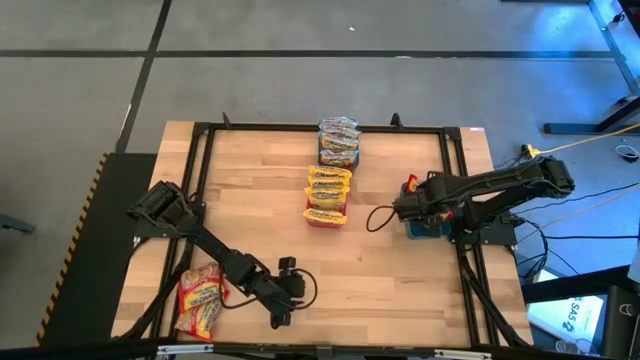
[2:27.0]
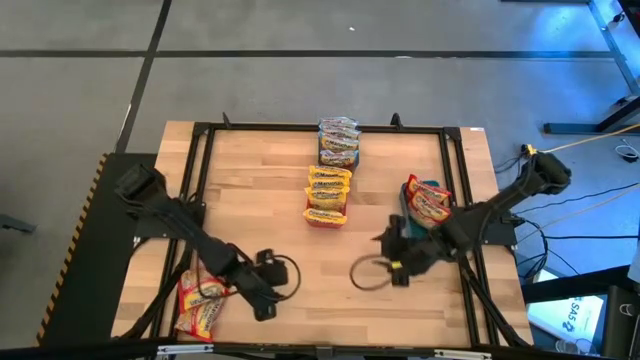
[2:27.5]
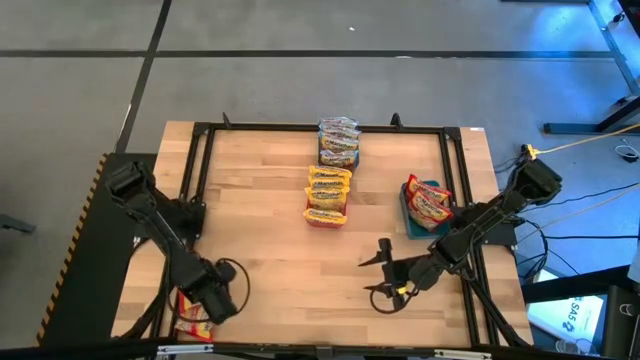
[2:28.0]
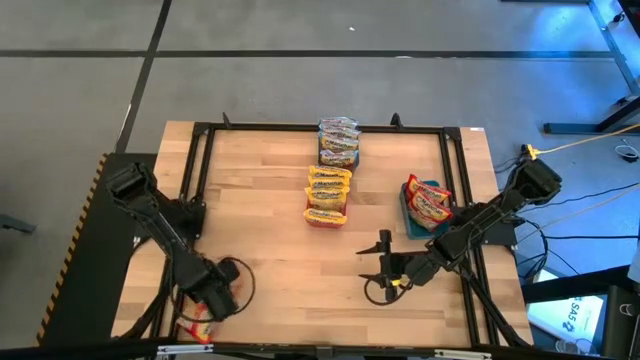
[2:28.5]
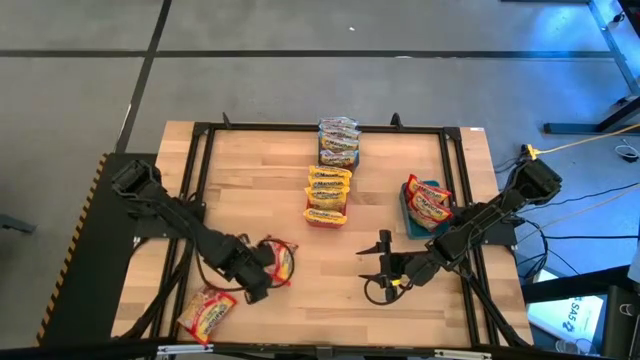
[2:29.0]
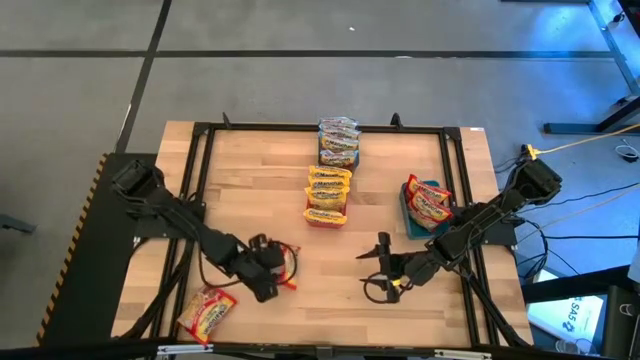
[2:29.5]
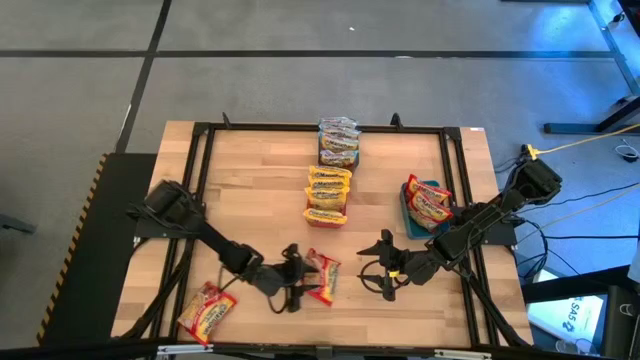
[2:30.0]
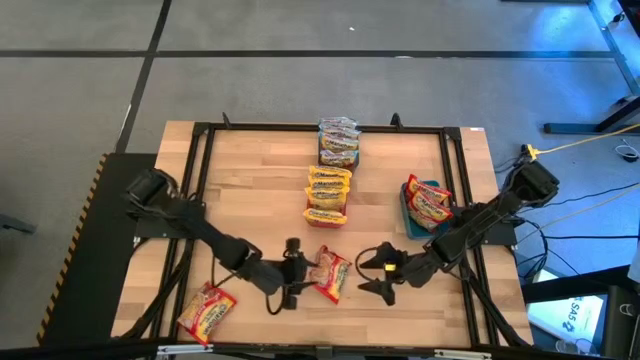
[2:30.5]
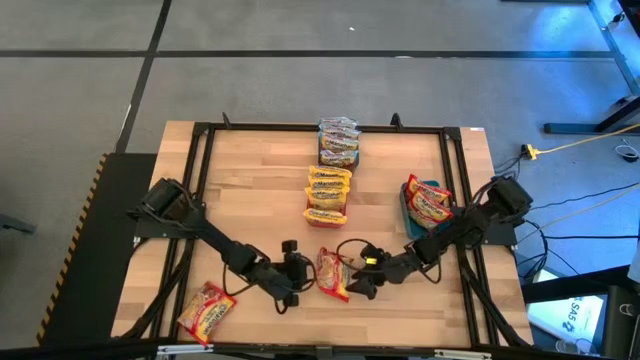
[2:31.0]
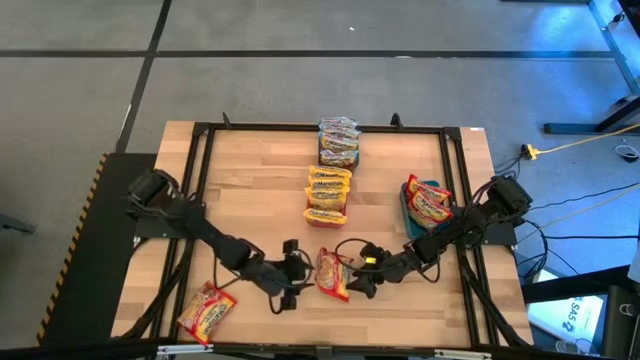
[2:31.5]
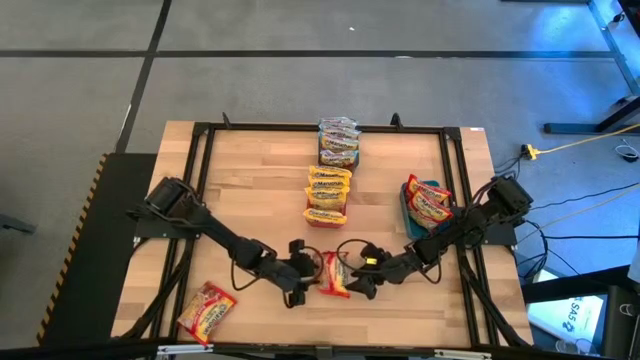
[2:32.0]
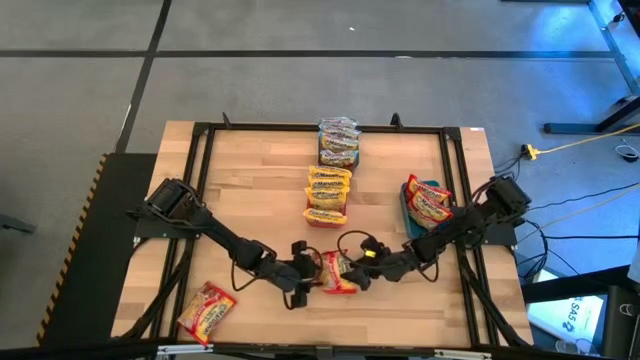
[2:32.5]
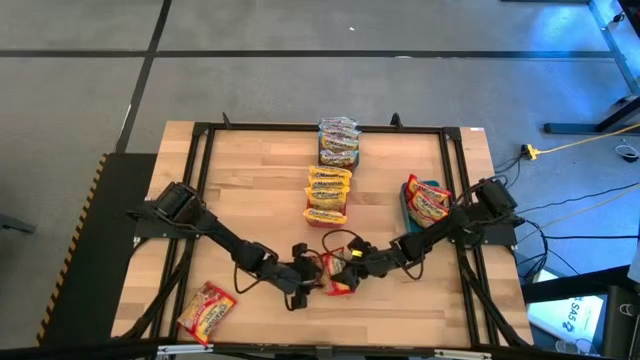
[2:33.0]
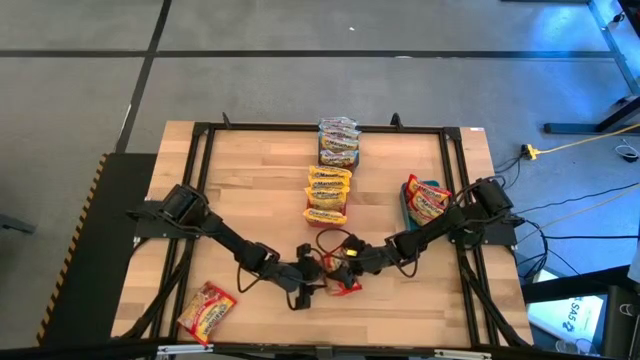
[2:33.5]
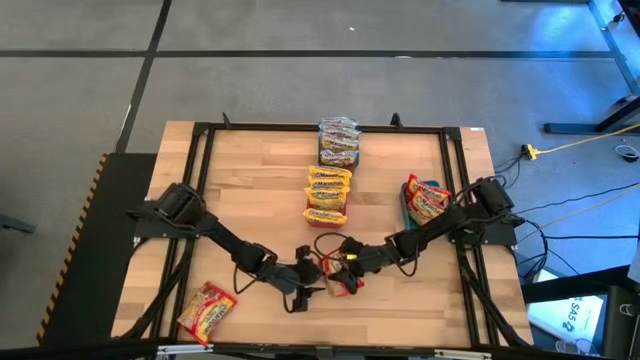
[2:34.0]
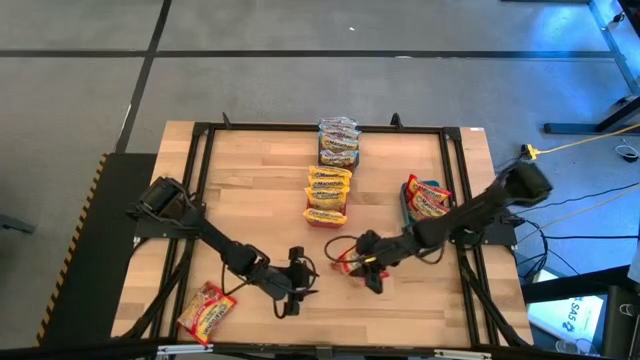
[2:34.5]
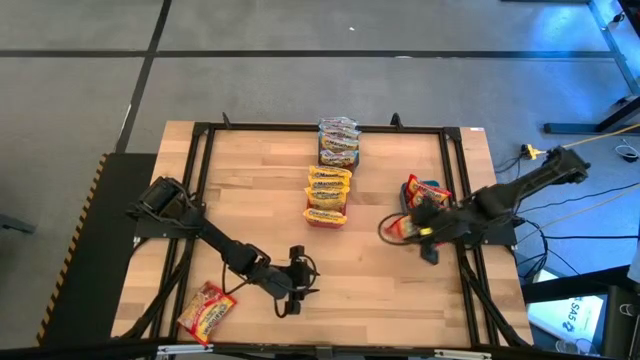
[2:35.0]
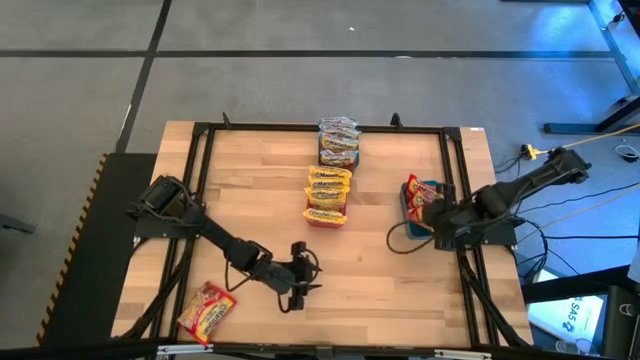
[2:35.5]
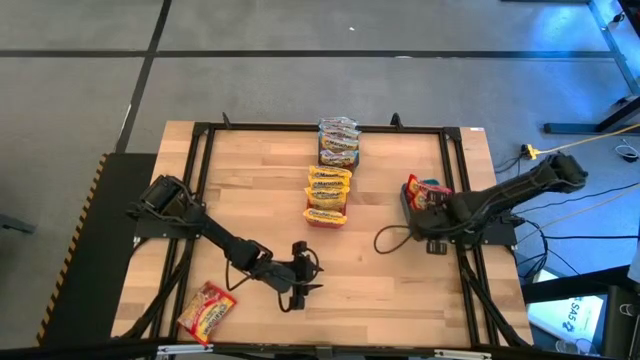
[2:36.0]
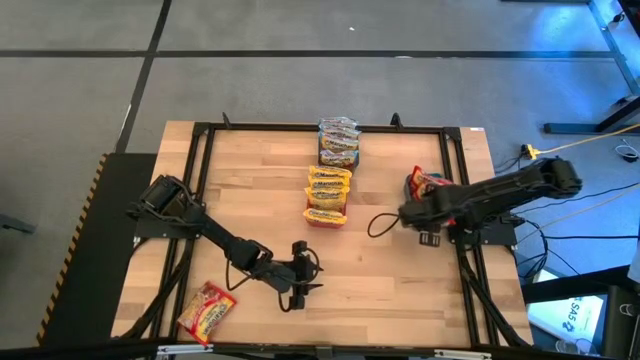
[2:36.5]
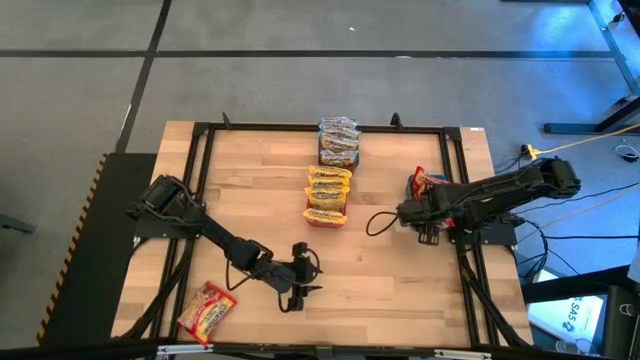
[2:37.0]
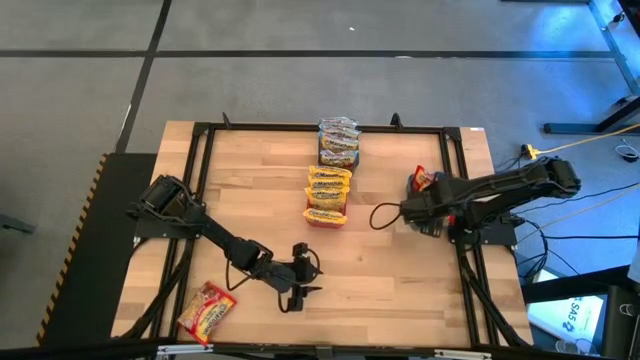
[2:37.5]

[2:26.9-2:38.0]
Task: Sort Maruchan noodles
Put the orange noodle pack into the blue bin

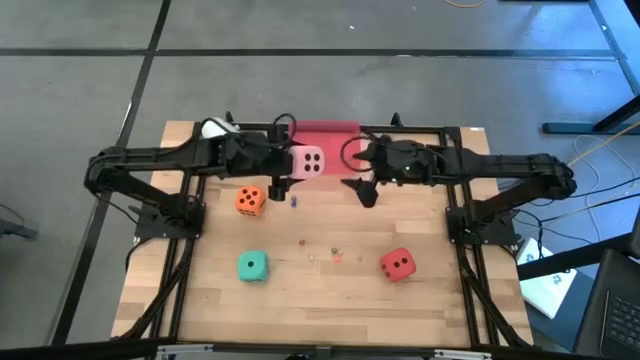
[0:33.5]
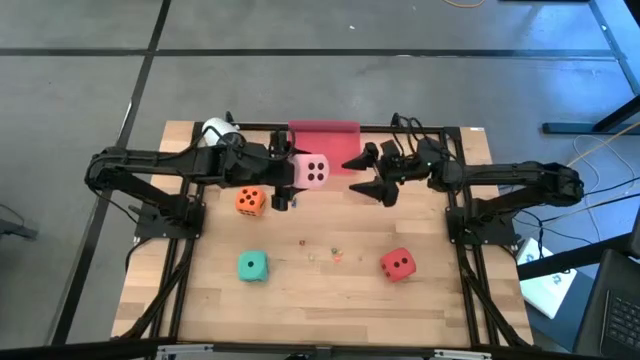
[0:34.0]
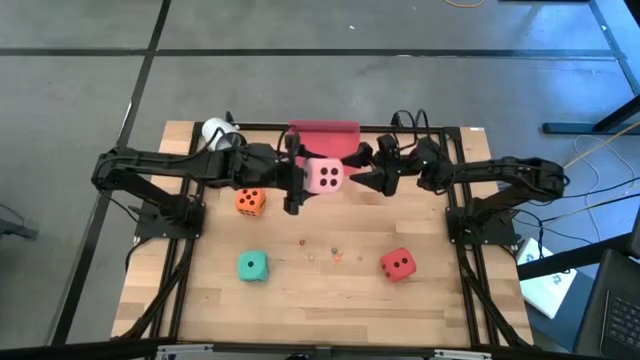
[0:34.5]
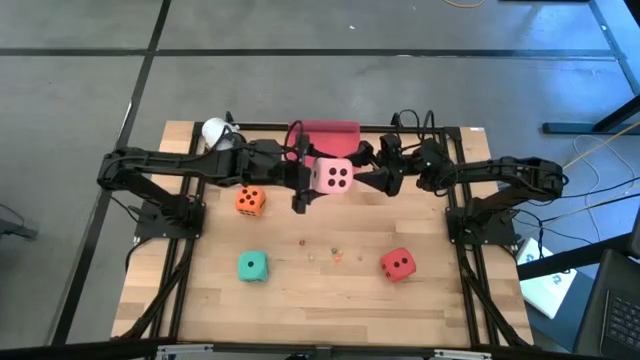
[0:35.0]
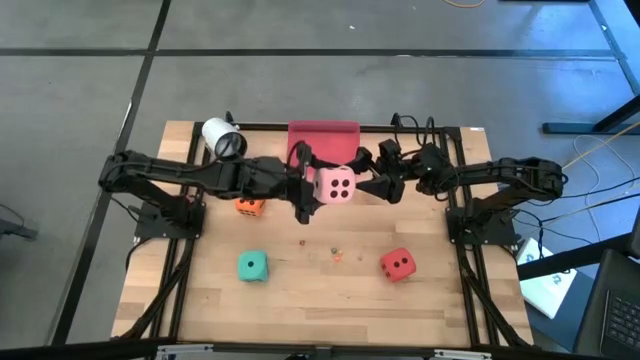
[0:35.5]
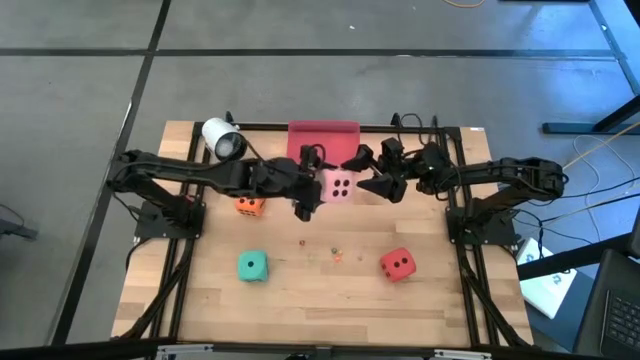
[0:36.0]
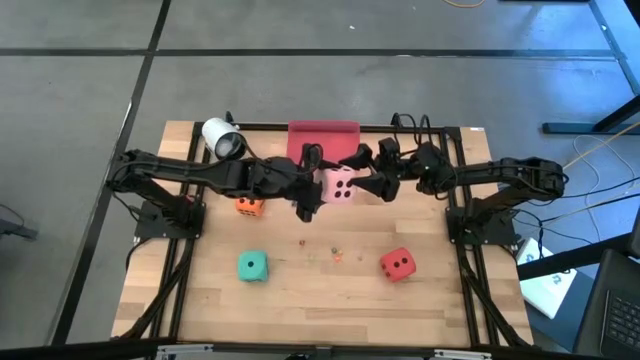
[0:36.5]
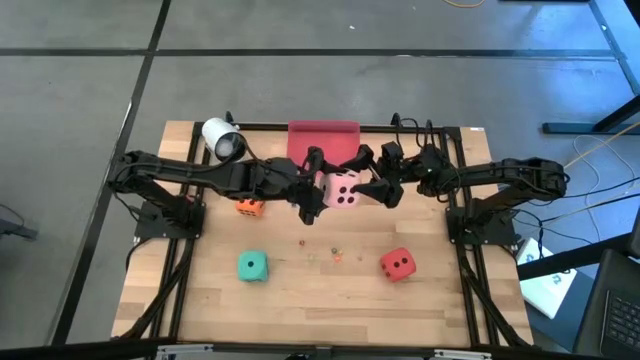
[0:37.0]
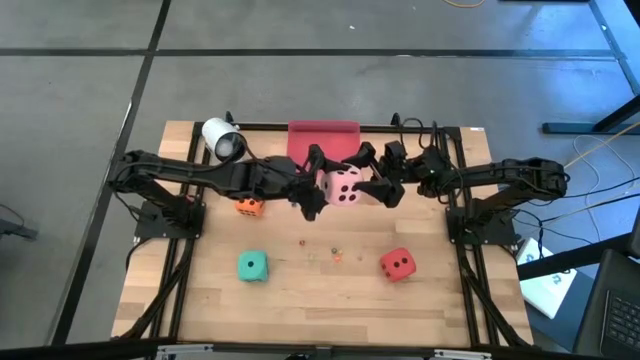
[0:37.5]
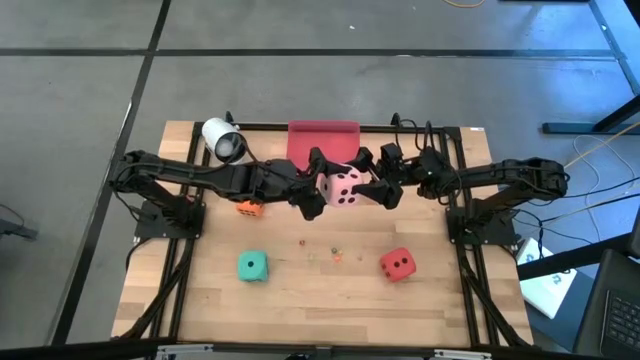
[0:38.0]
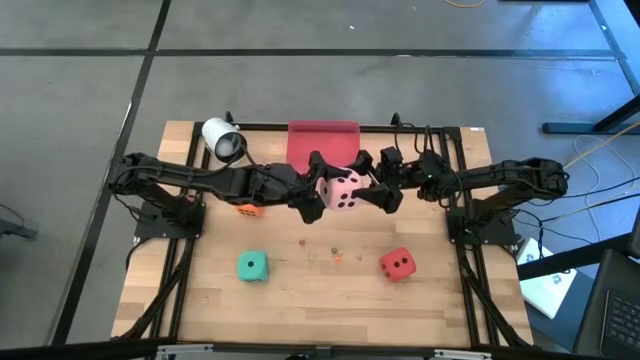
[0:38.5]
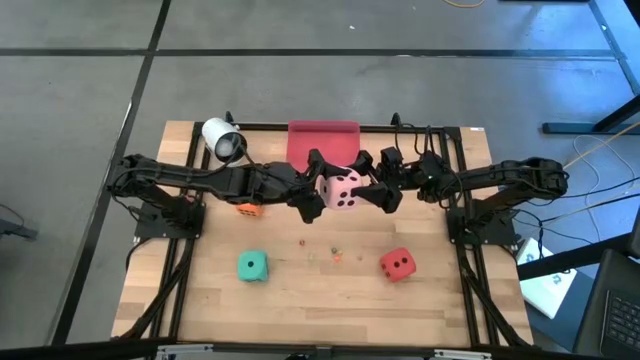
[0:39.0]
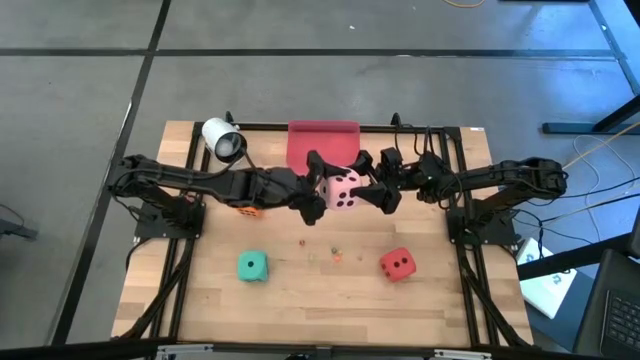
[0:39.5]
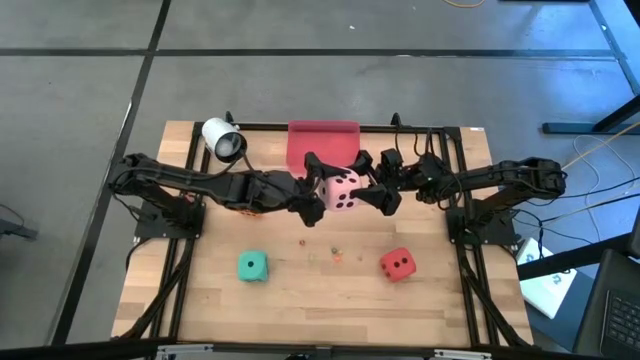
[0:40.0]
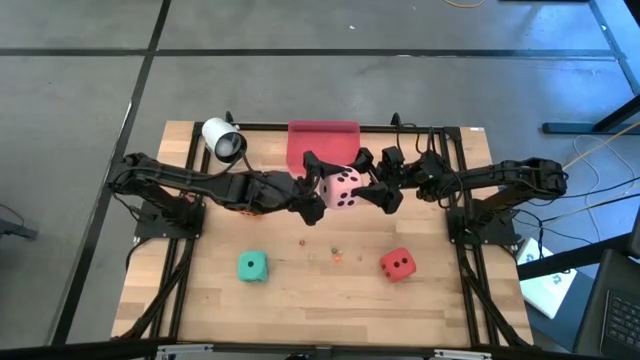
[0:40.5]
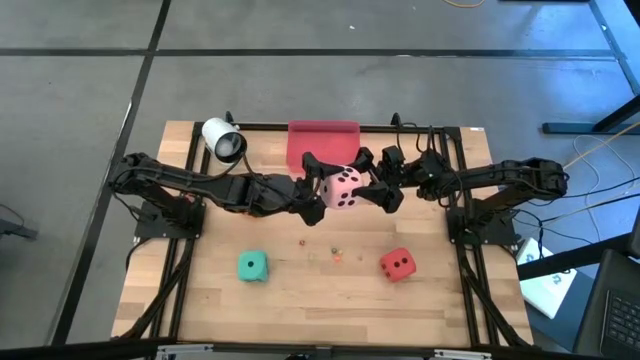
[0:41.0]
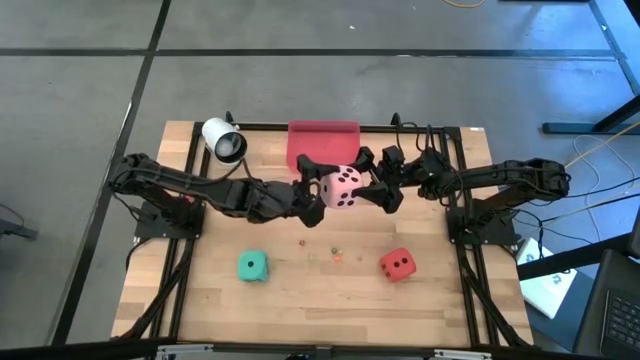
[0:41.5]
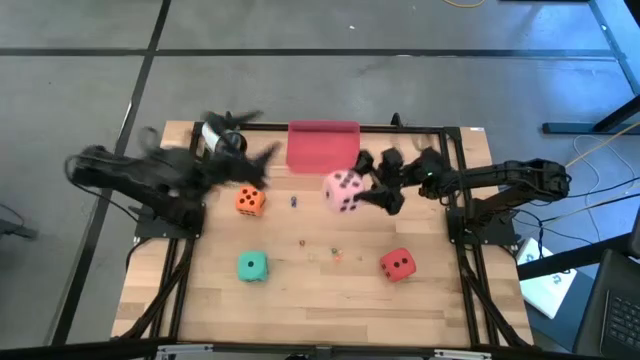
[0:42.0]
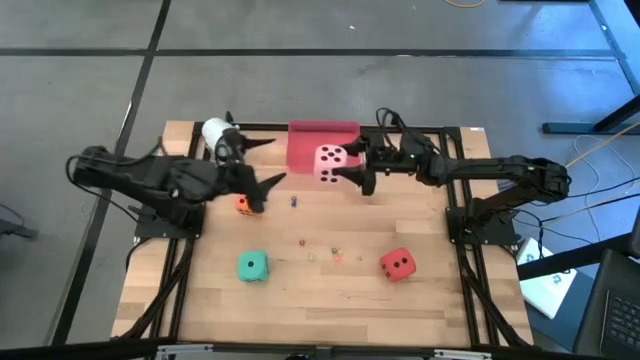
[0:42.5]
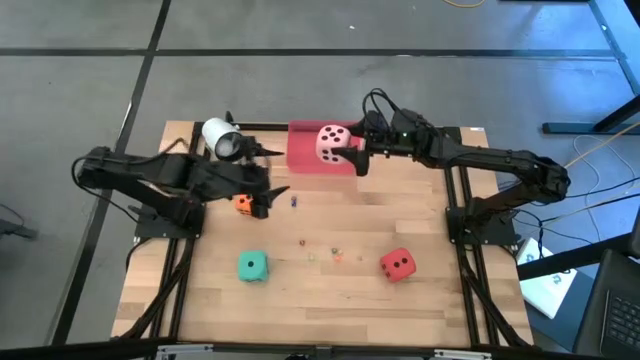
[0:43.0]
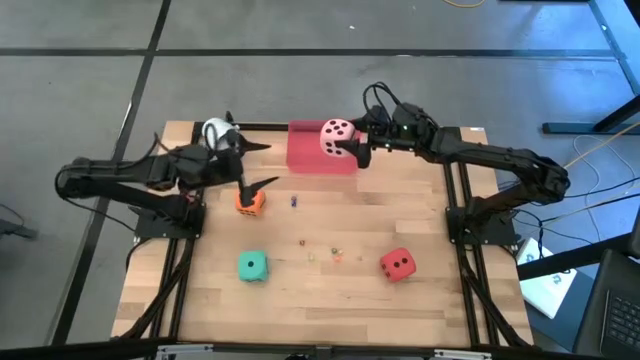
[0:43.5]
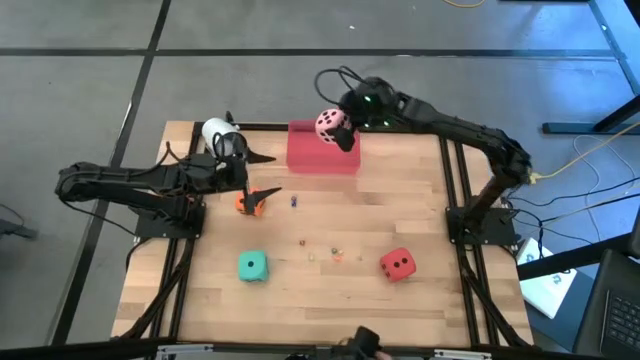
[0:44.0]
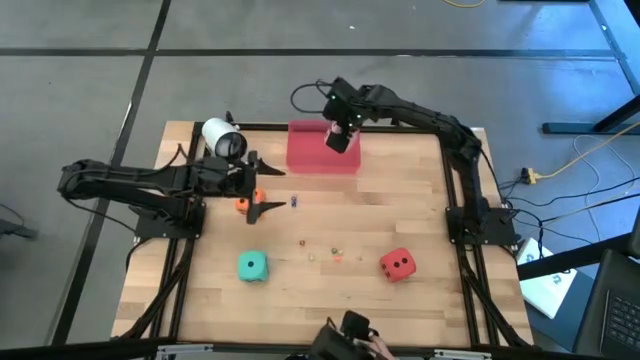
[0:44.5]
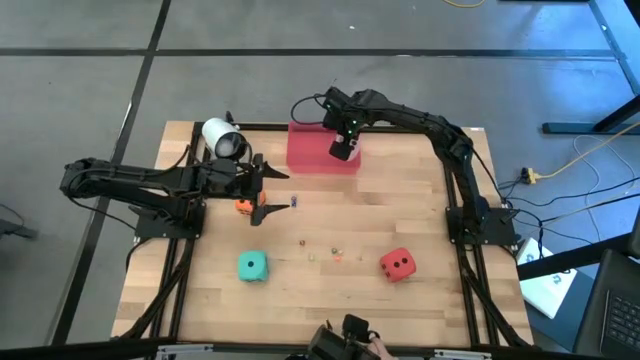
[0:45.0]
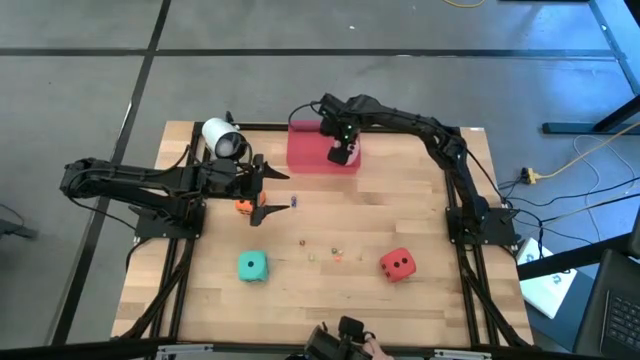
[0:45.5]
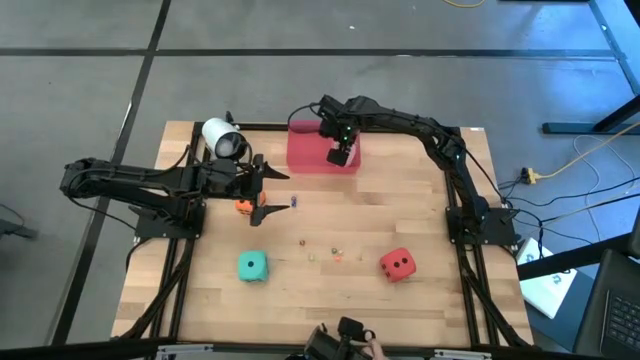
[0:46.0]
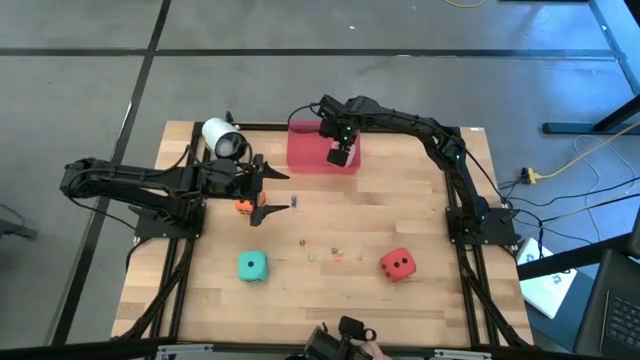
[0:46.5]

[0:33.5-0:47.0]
Task: Pick & Place Dice
Put the big pink dice into the pink bin
